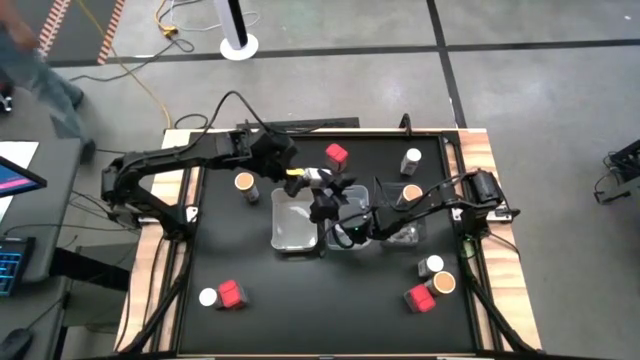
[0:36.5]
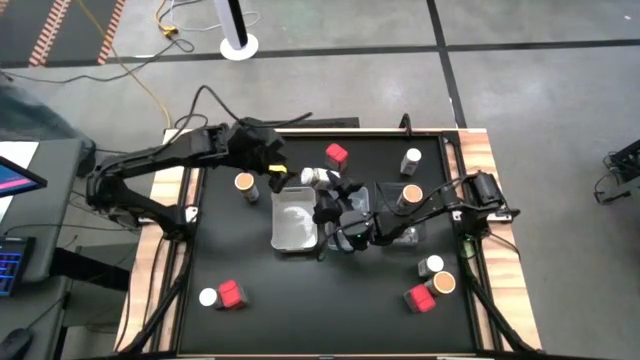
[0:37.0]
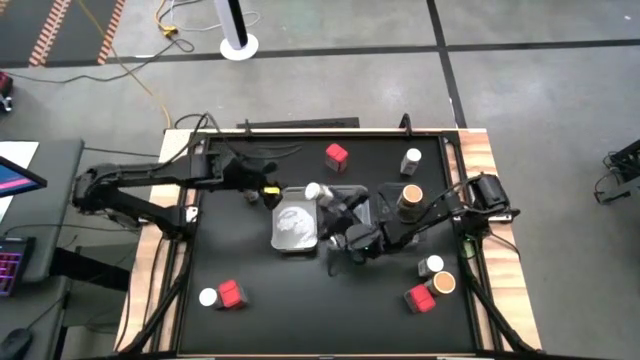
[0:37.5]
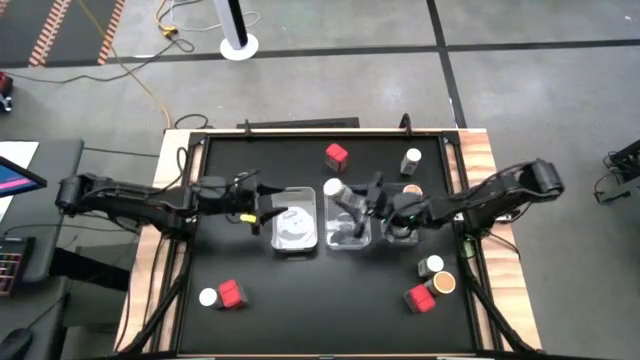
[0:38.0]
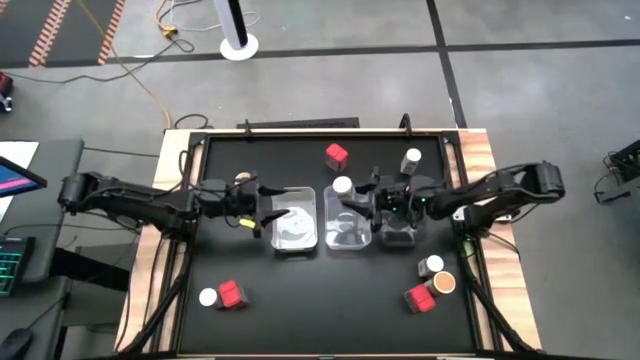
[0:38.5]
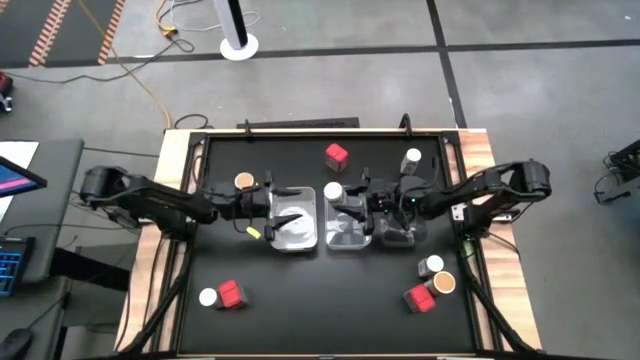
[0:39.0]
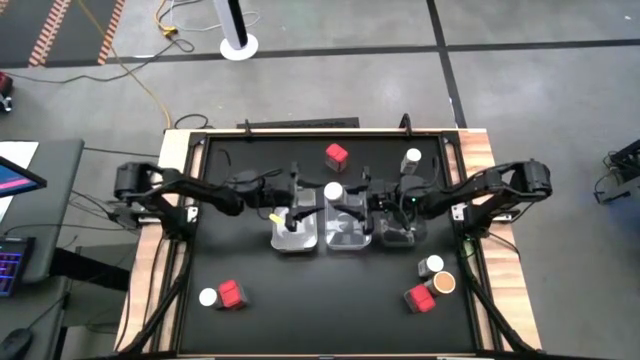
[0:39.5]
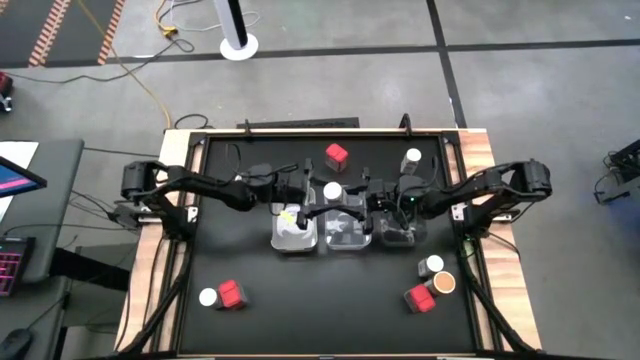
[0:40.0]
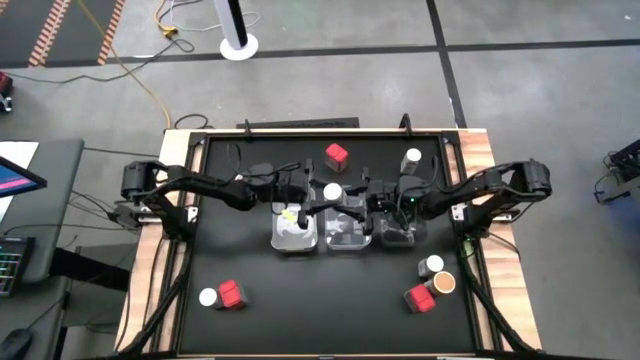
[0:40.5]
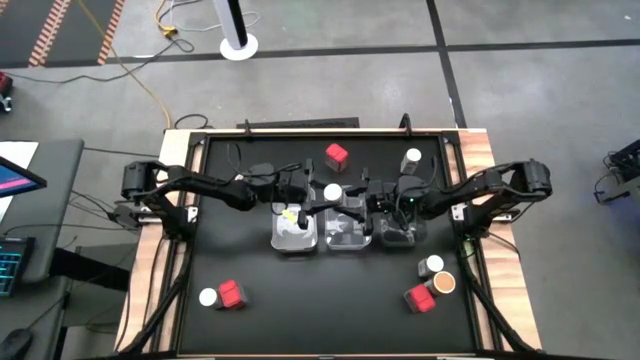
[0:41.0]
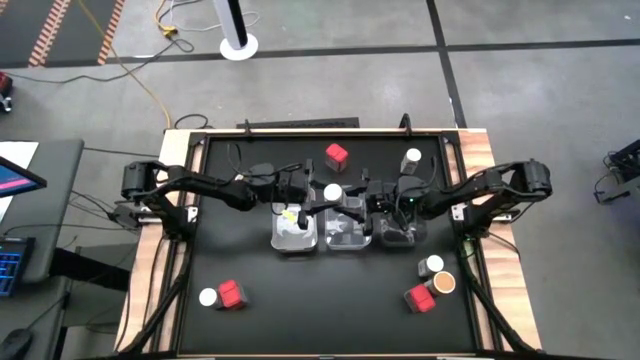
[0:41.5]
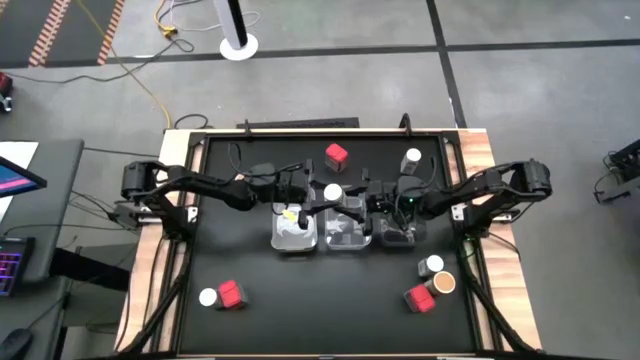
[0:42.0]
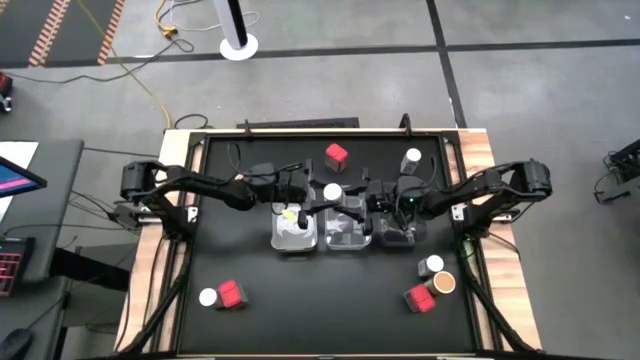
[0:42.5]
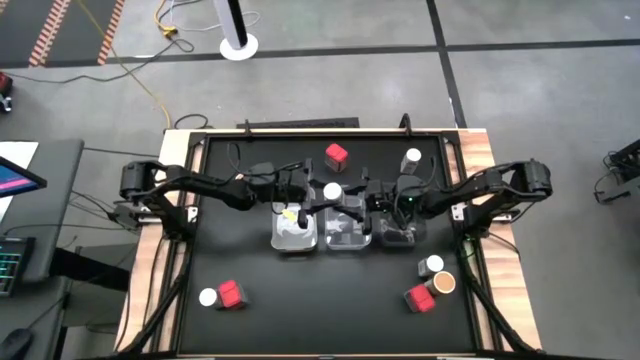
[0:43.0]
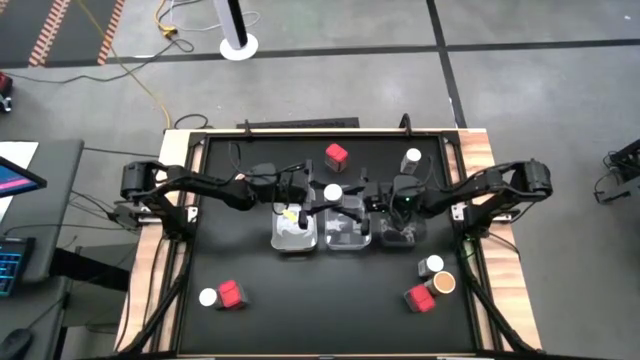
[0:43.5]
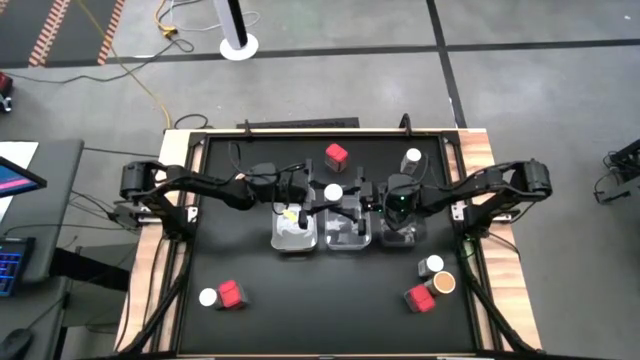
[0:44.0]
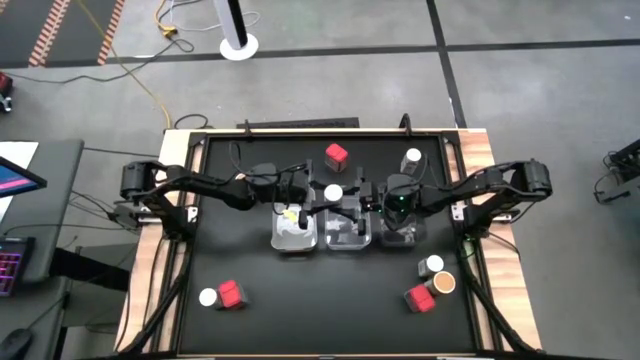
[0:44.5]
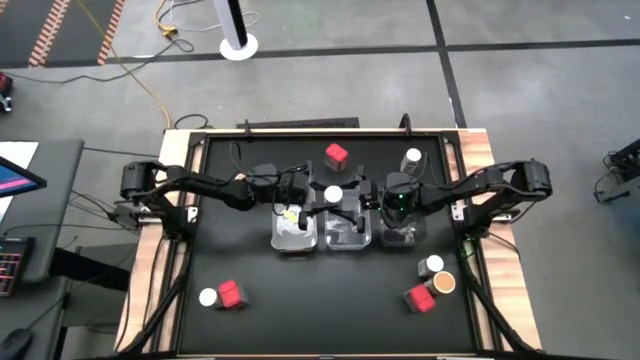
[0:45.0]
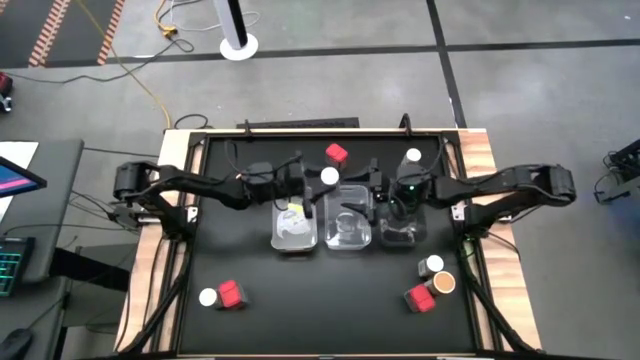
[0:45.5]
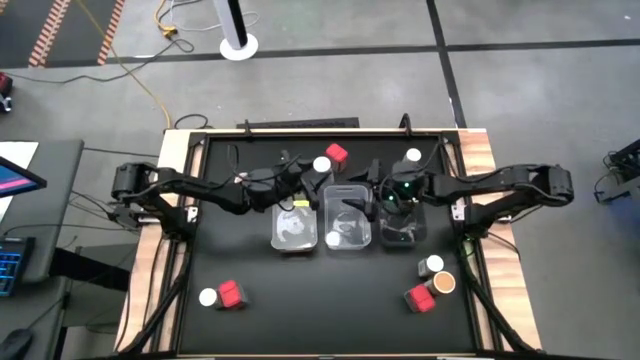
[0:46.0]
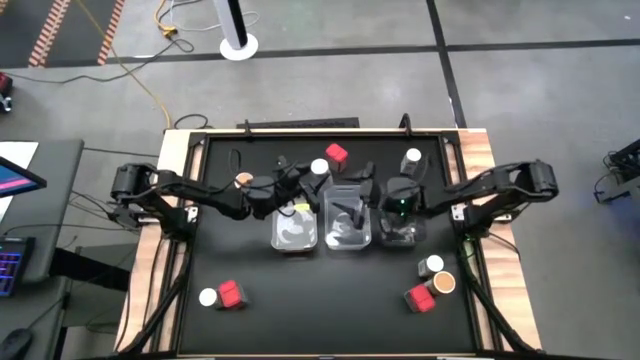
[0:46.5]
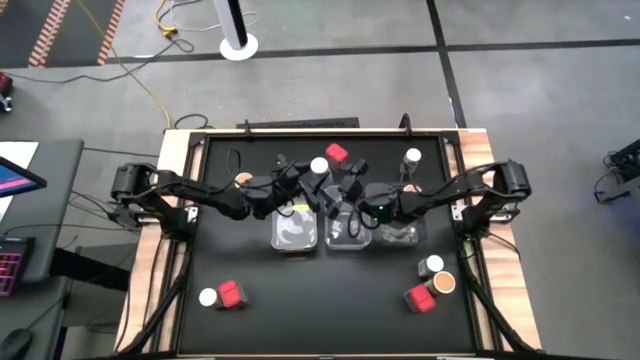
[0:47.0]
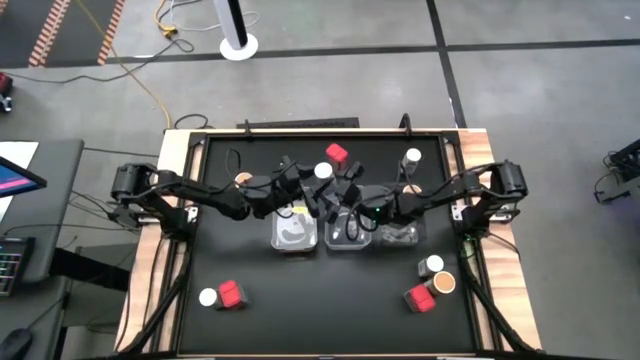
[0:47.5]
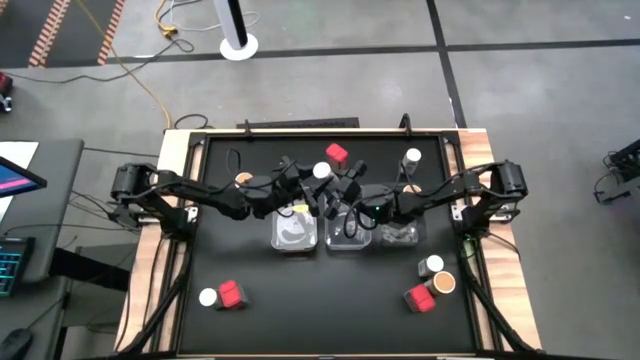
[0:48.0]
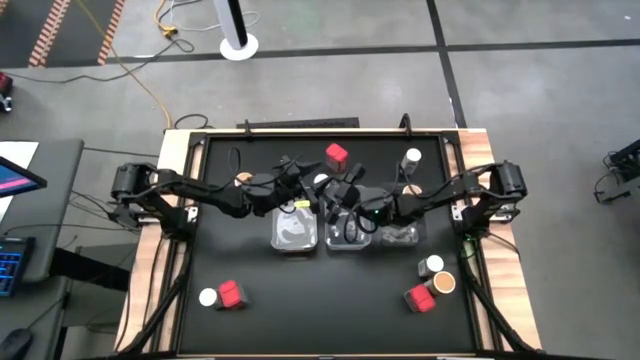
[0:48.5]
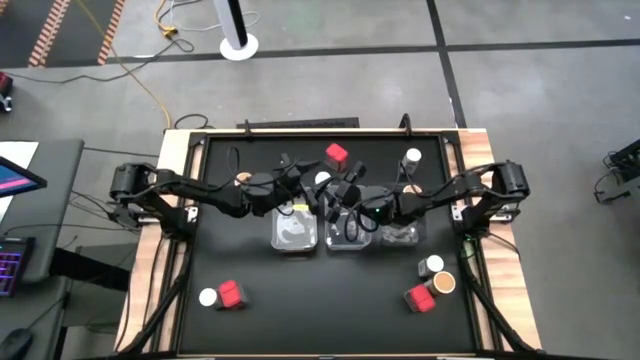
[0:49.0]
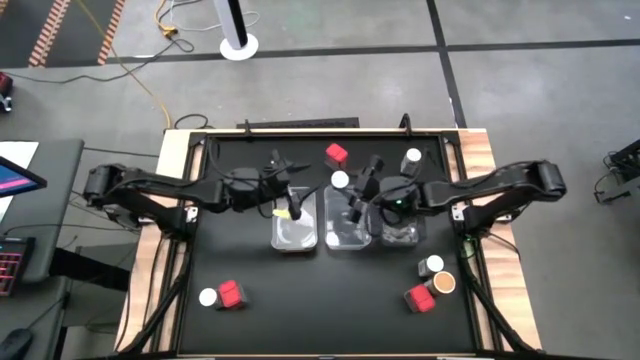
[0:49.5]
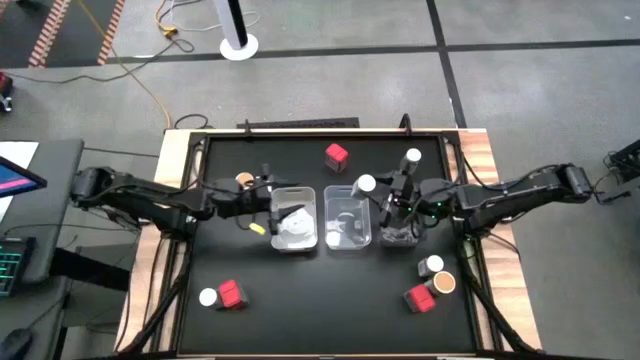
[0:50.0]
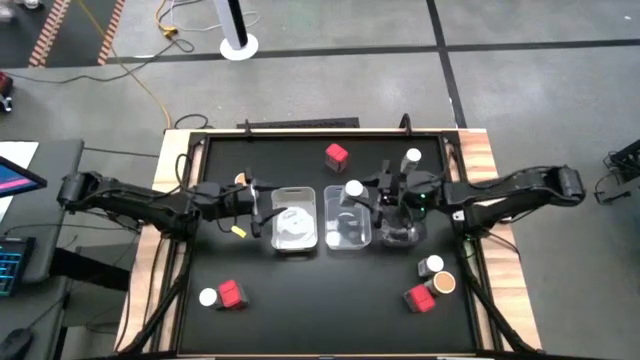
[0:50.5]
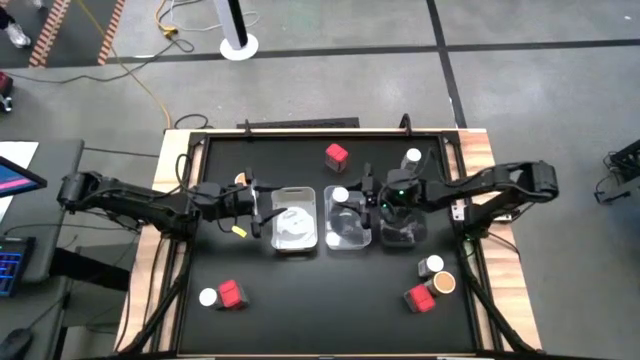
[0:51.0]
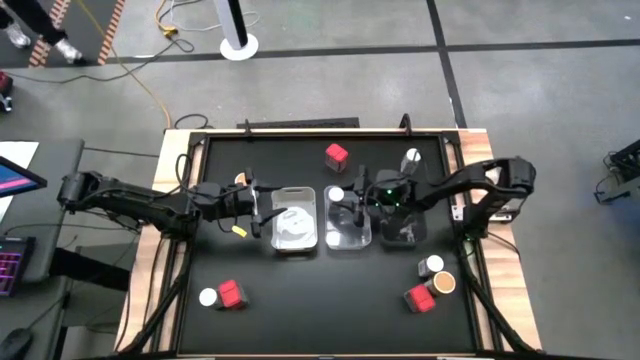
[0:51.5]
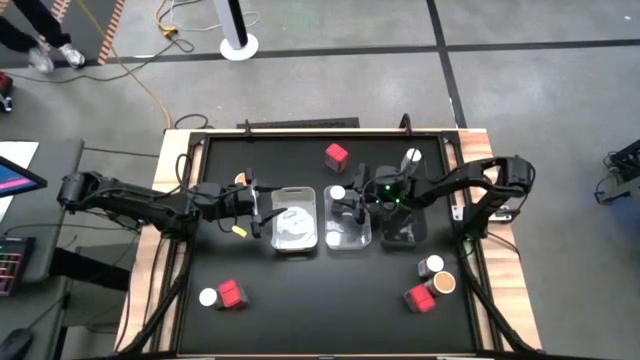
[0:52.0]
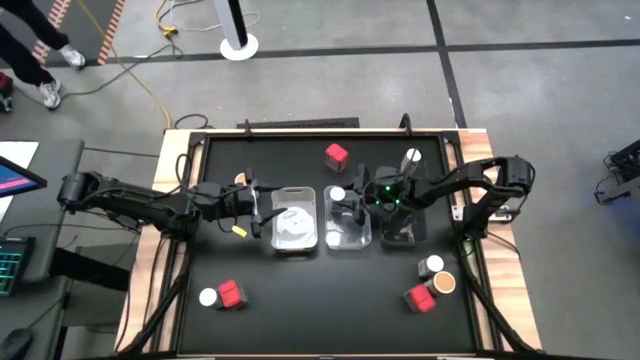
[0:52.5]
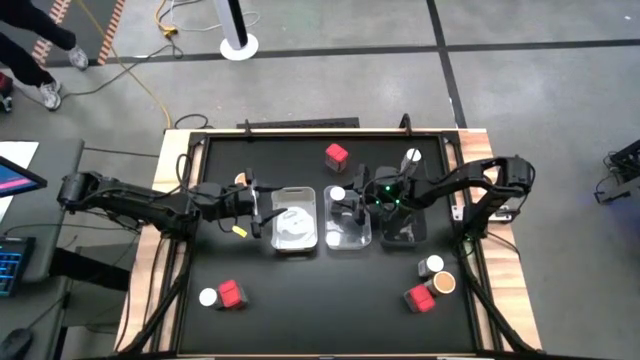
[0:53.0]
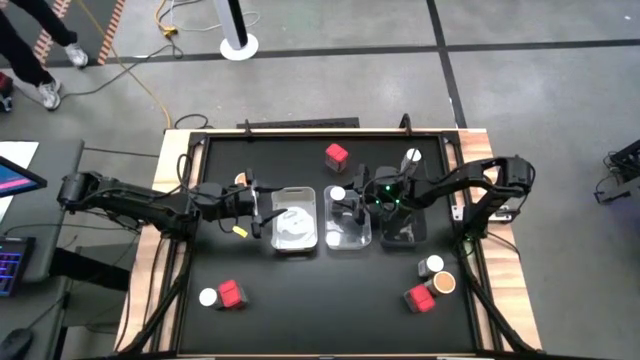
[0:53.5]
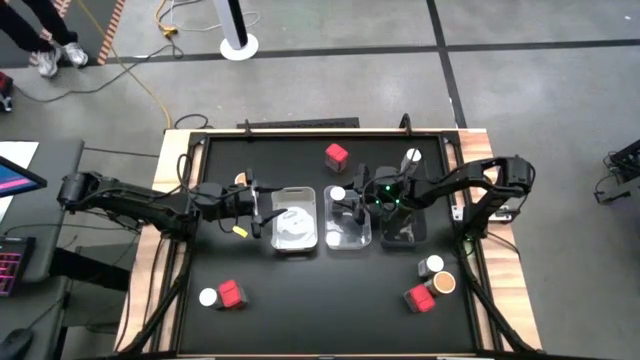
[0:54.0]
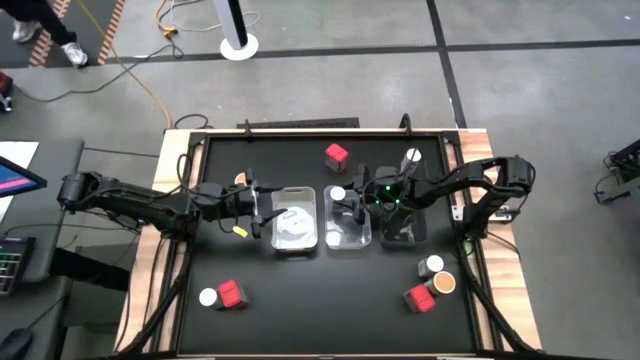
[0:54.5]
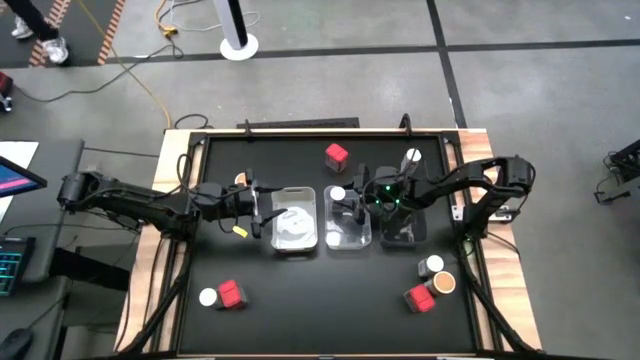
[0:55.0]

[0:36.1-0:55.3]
Task: Sort spices by type
Put the top left white seasoning bottle into the transparent bin

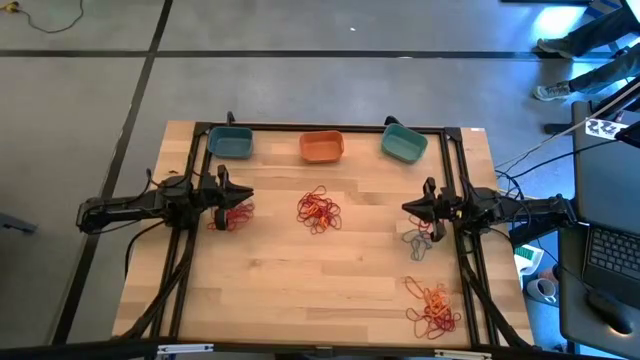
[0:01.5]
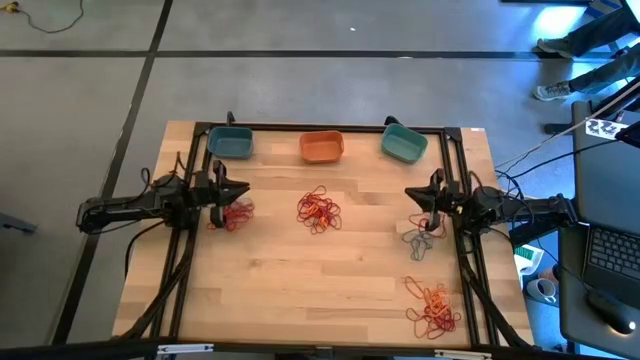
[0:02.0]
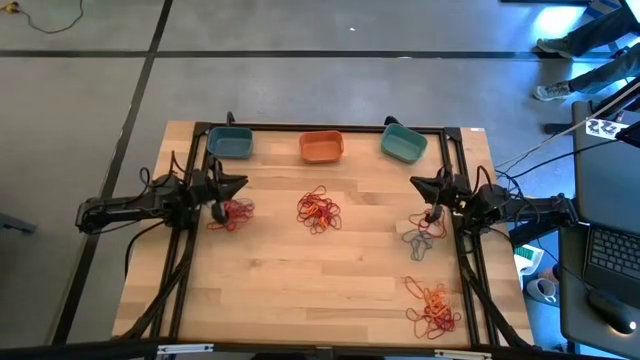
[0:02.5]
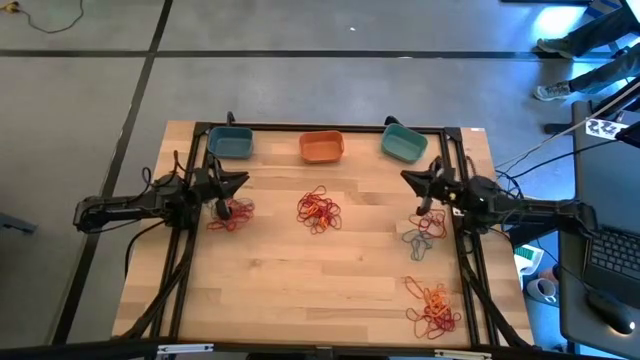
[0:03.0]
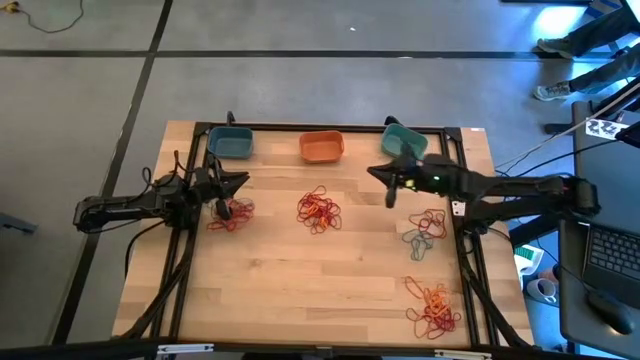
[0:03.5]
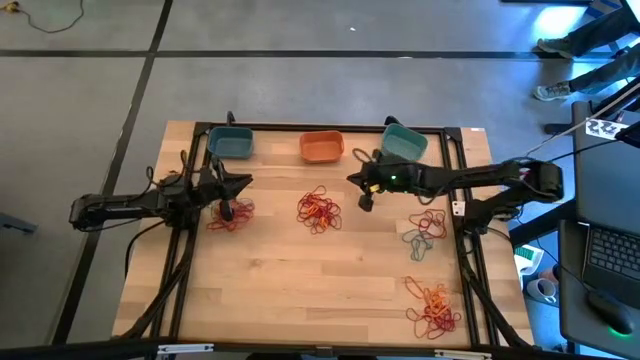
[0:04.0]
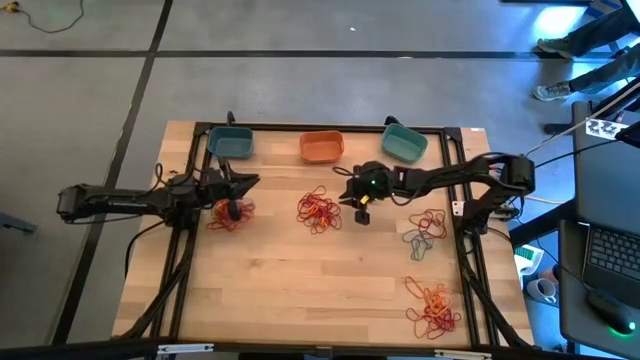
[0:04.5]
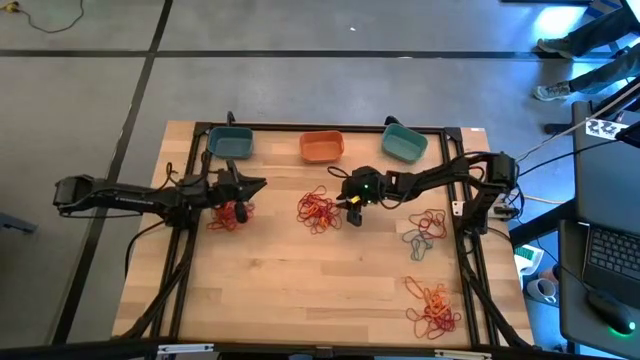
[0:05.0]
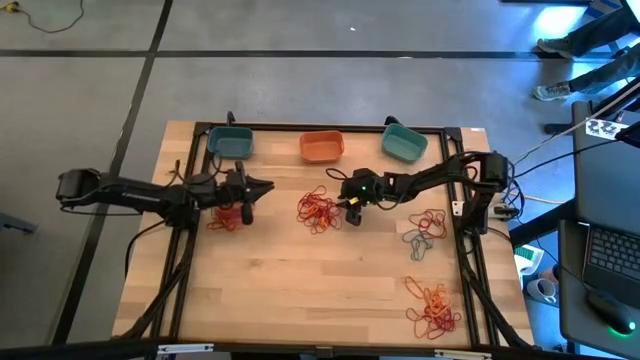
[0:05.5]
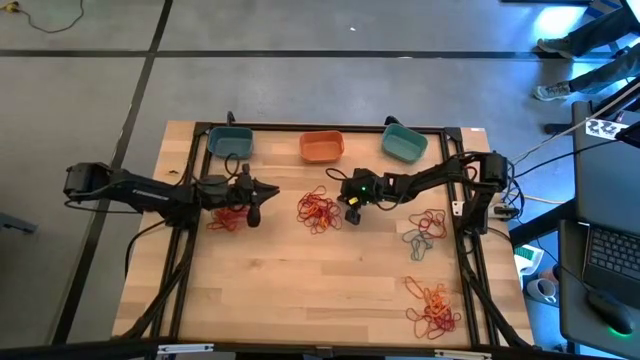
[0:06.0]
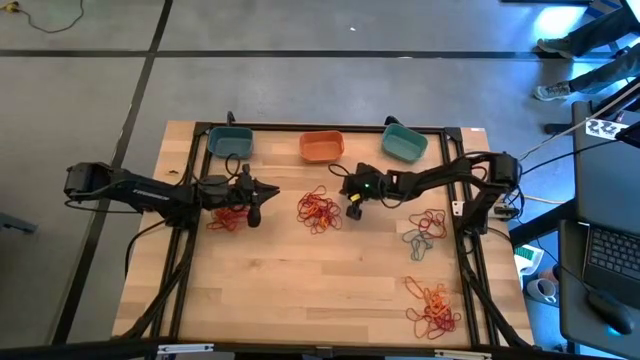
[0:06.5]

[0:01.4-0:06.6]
Task: Sort rubber bands into baskets
Put the red rubber band into the green bin
